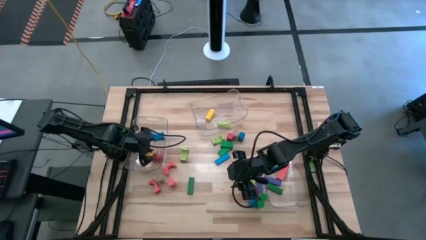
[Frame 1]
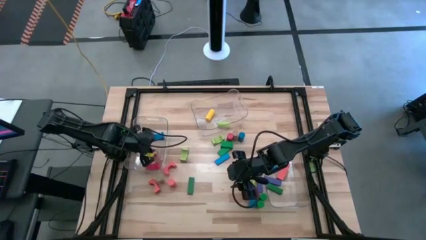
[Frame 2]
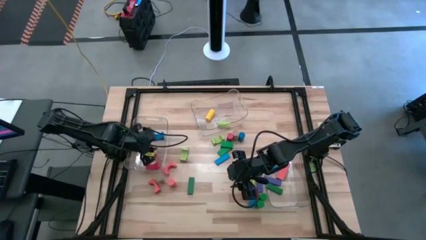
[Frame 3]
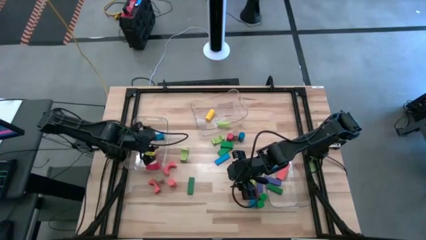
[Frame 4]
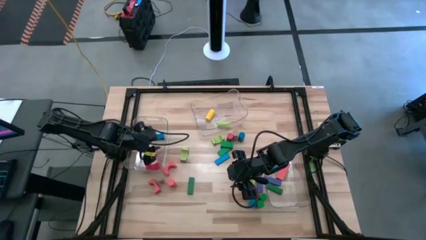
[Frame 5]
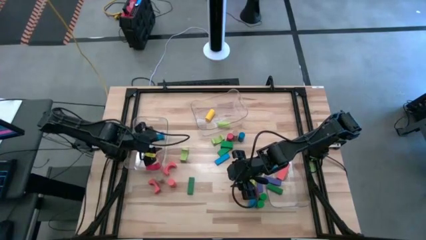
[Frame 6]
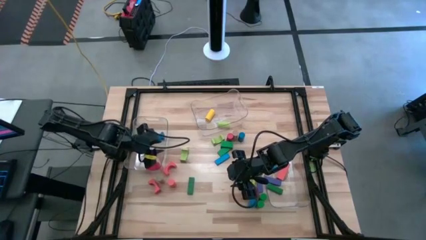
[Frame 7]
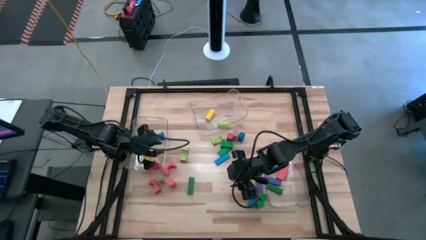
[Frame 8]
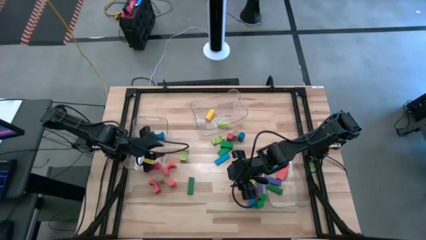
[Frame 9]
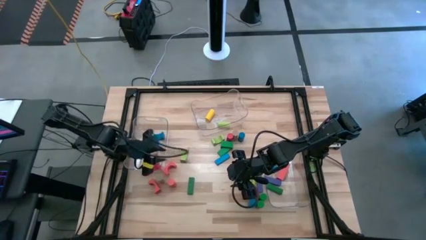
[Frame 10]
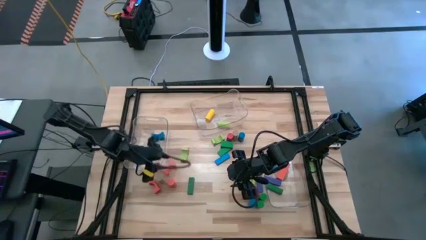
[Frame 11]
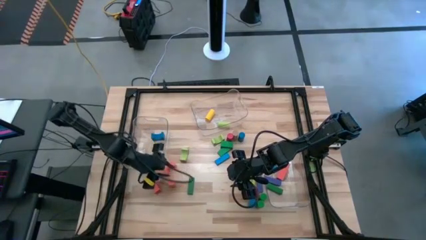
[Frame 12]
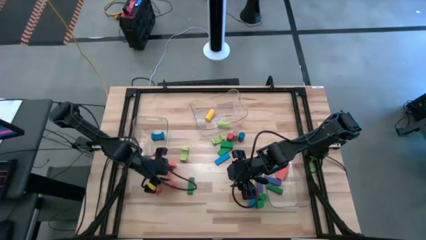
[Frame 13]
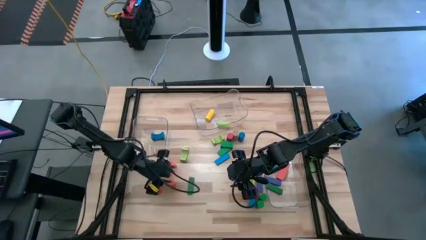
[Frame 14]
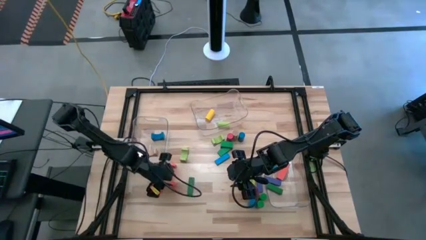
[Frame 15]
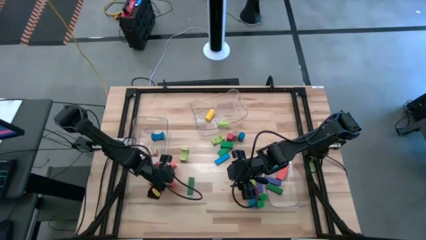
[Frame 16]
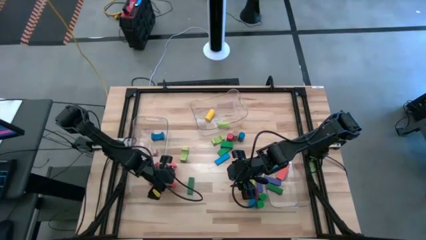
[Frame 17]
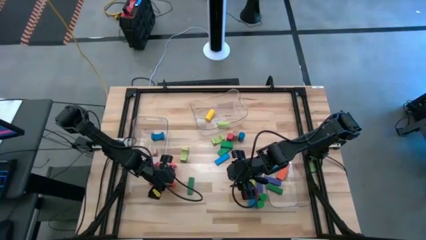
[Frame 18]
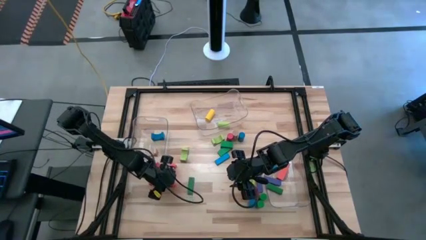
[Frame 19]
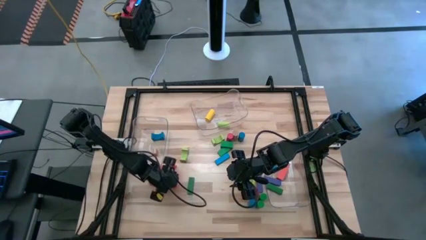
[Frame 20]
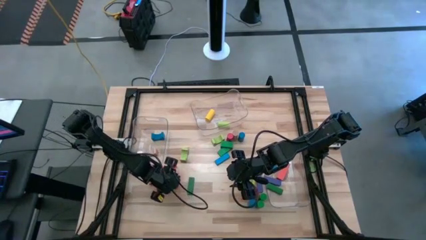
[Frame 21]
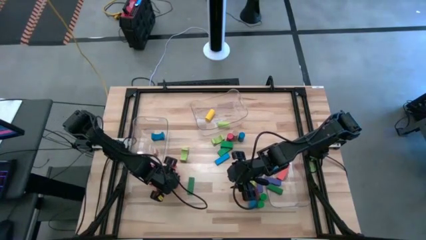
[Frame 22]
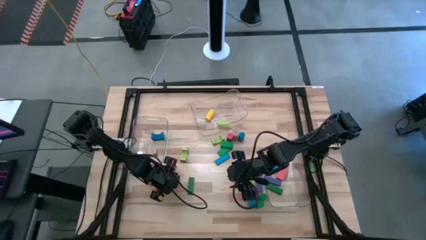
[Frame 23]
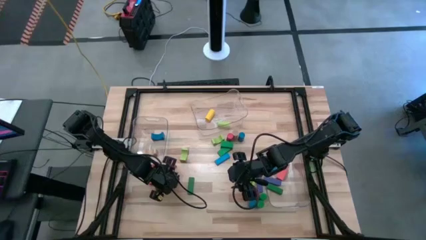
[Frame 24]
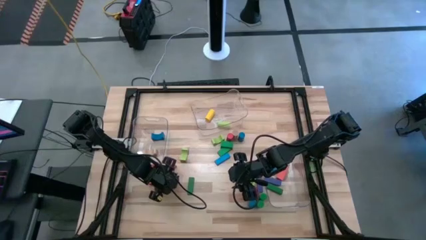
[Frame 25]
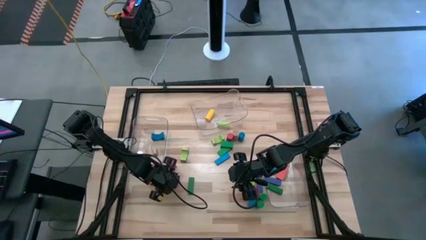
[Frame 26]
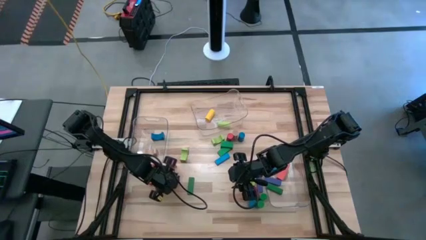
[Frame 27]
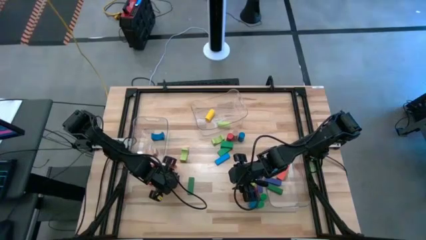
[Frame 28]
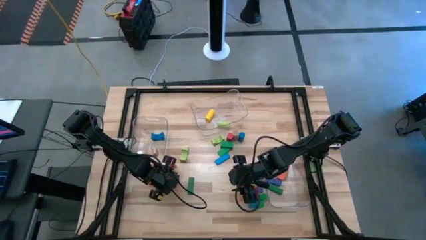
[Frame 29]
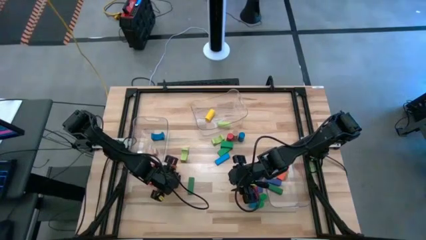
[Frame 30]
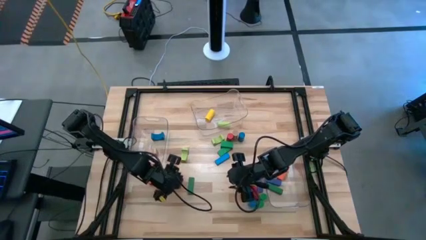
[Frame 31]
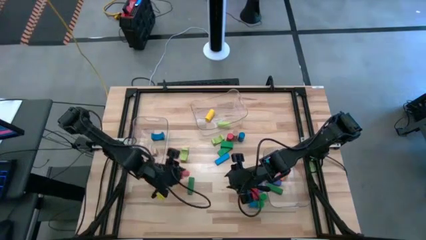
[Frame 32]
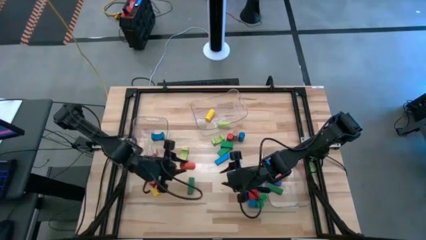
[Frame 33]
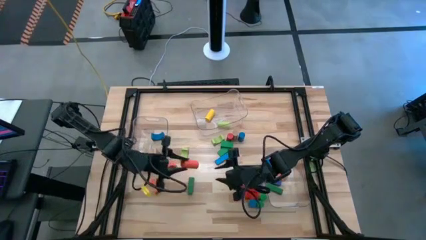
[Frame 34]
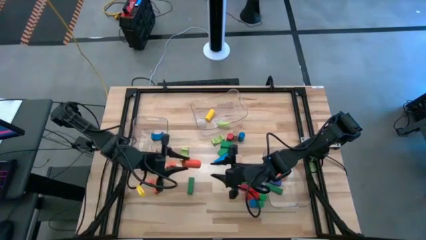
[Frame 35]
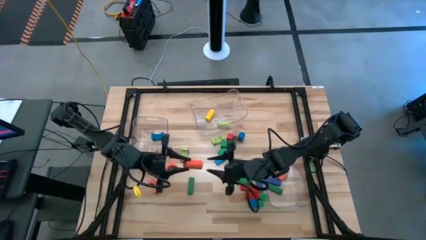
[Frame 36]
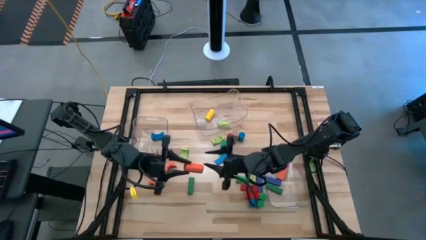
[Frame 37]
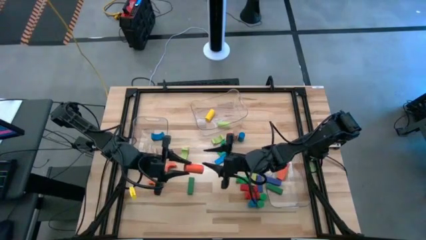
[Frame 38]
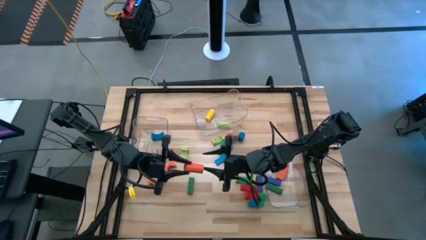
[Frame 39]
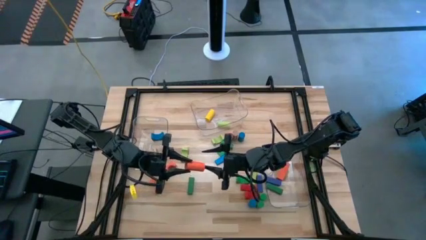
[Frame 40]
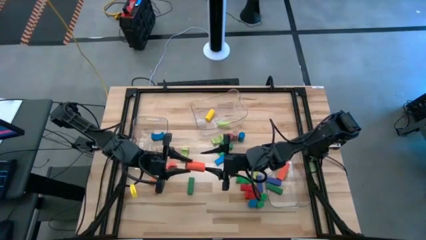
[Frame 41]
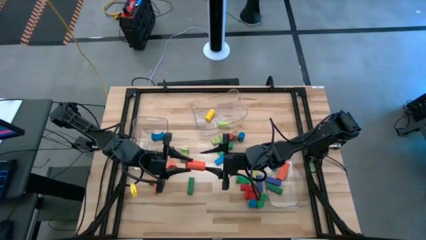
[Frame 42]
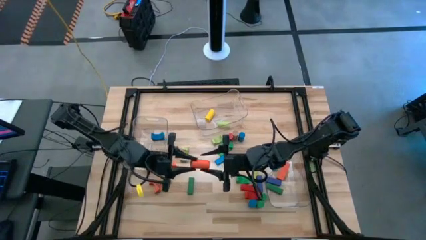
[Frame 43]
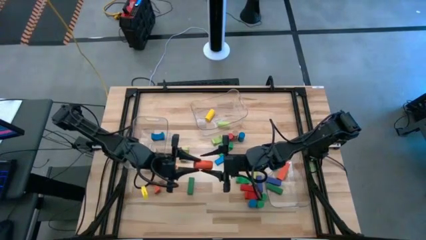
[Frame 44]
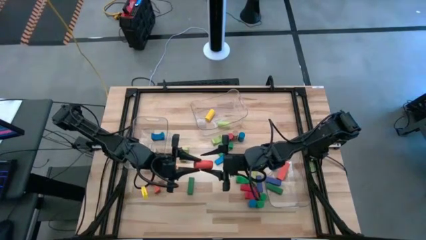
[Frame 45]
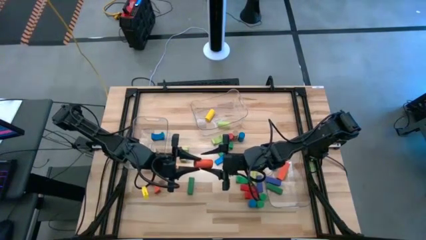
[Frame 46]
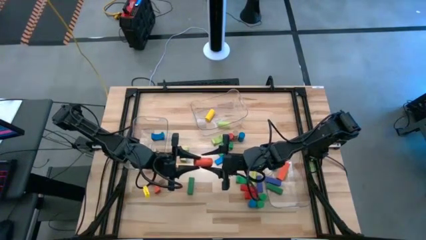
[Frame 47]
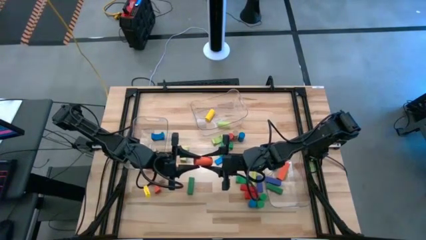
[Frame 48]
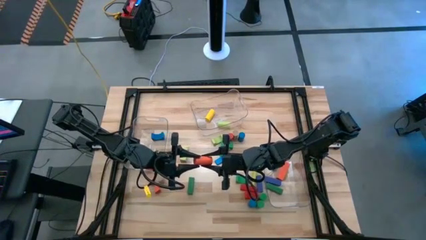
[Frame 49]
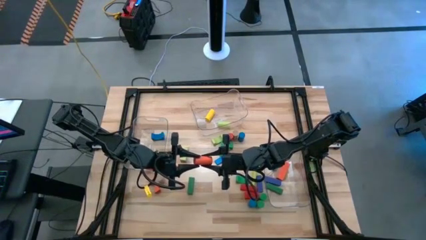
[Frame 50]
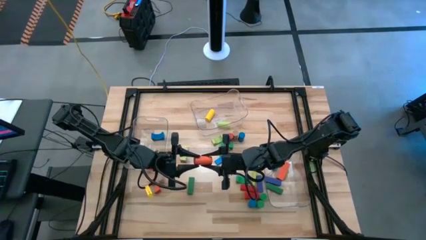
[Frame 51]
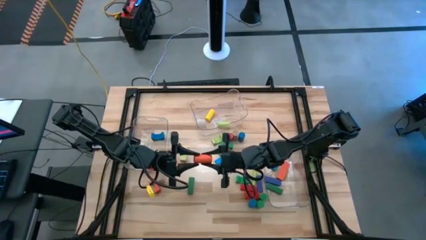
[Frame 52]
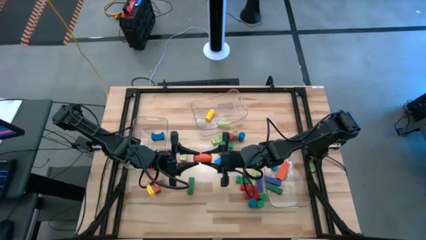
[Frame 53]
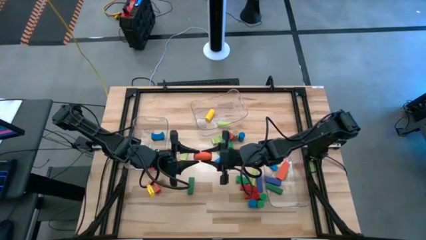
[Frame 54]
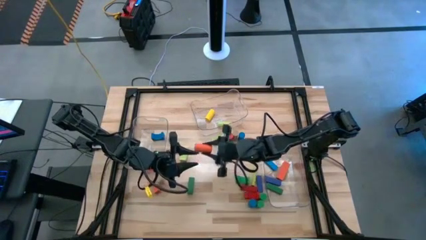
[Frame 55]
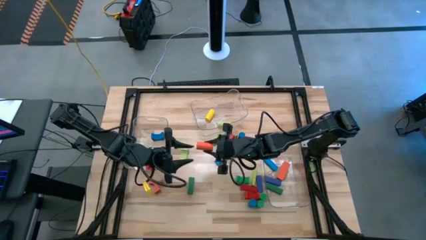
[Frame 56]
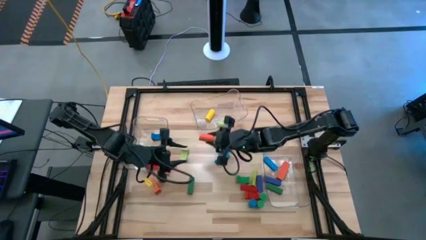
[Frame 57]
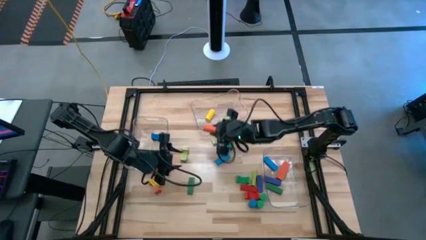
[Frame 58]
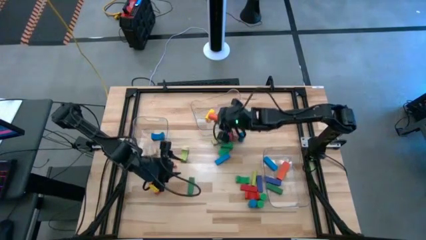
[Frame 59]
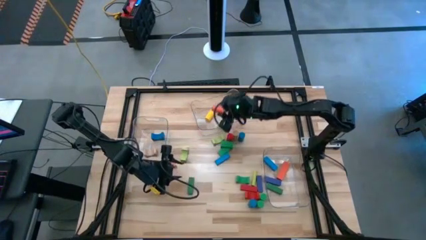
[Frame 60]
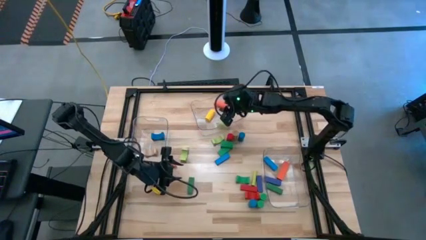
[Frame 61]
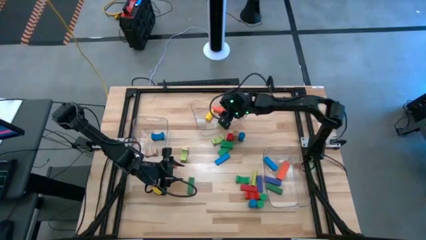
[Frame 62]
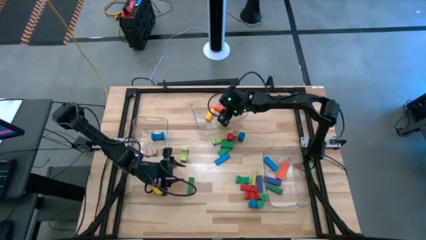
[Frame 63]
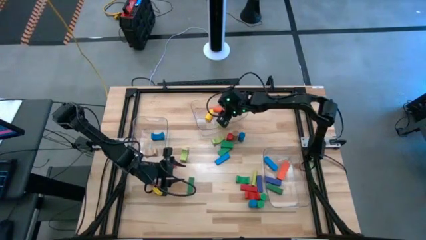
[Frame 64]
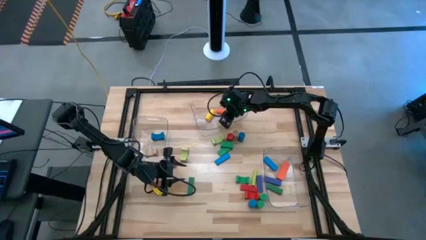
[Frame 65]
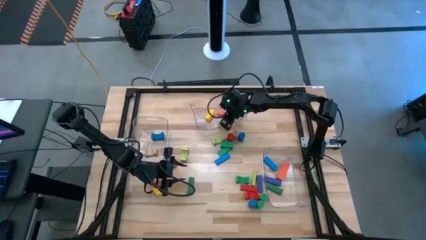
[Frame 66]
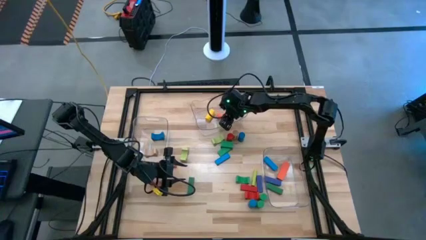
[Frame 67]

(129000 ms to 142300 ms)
Task: Sort blocks by size
Put the red cylindrical block into the top transparent bin
